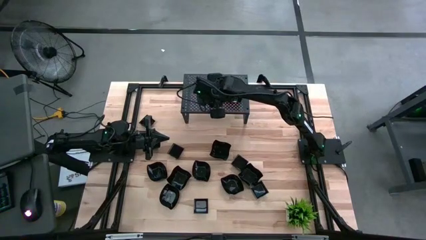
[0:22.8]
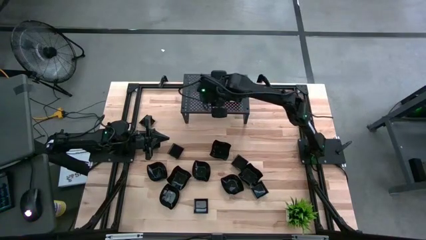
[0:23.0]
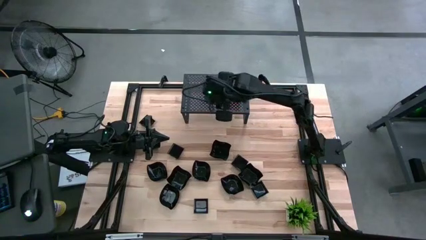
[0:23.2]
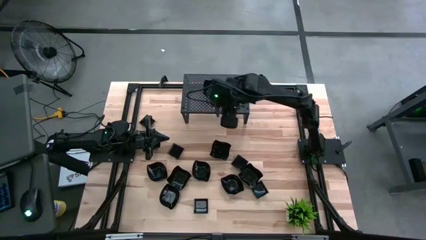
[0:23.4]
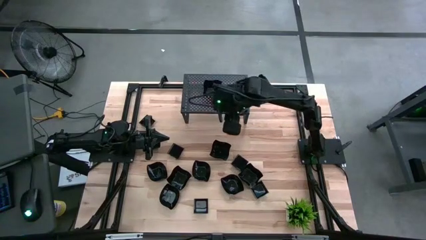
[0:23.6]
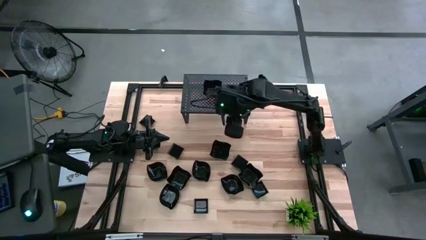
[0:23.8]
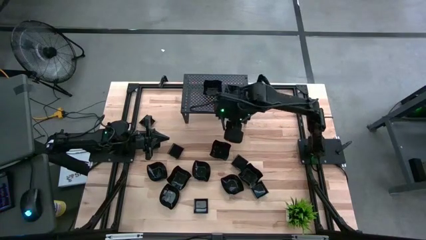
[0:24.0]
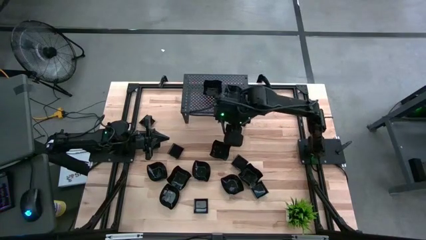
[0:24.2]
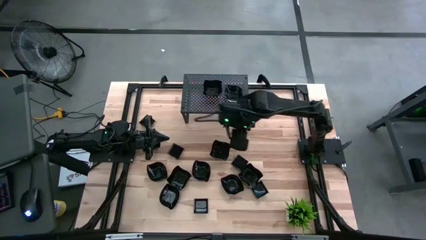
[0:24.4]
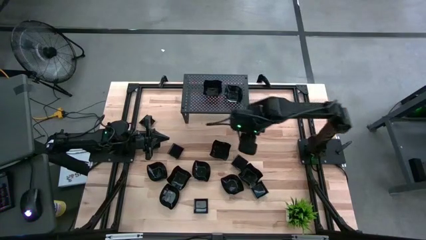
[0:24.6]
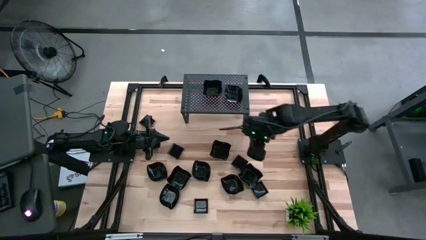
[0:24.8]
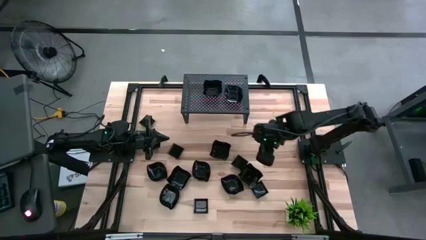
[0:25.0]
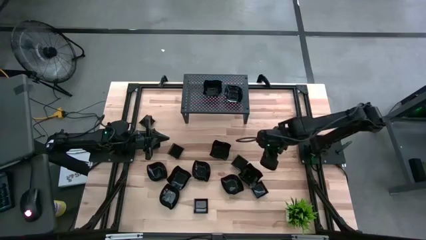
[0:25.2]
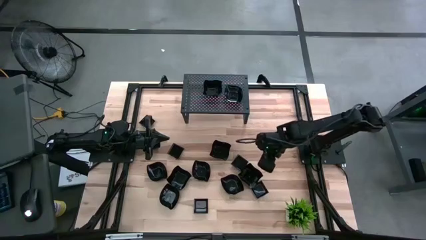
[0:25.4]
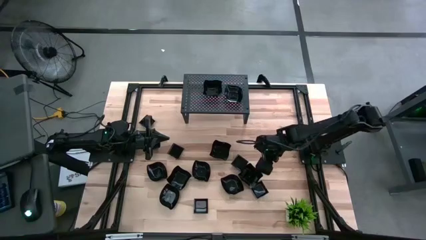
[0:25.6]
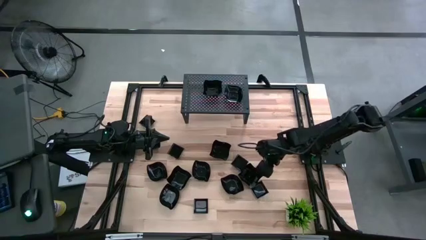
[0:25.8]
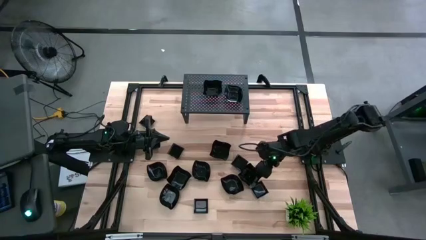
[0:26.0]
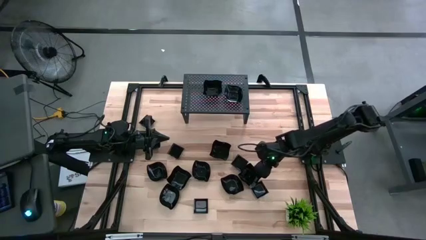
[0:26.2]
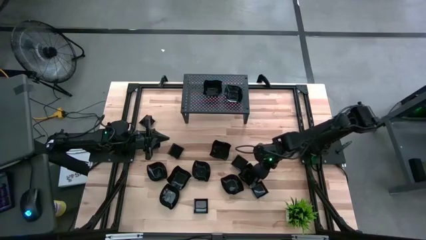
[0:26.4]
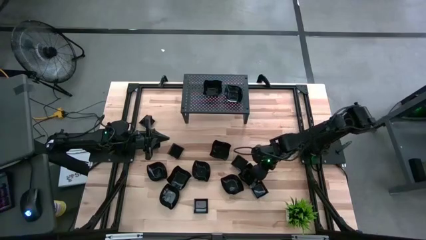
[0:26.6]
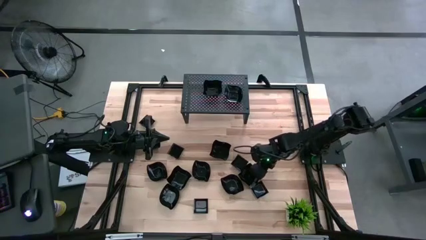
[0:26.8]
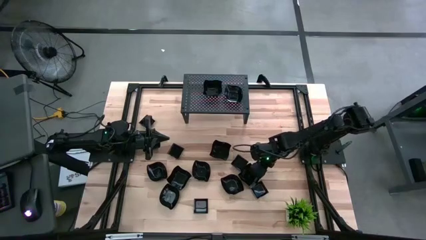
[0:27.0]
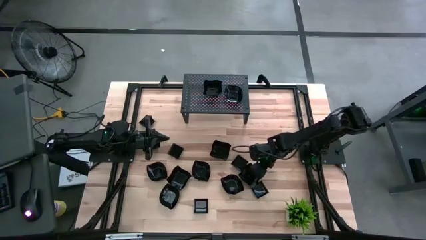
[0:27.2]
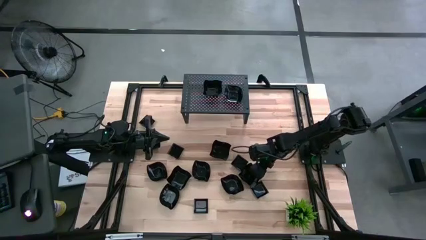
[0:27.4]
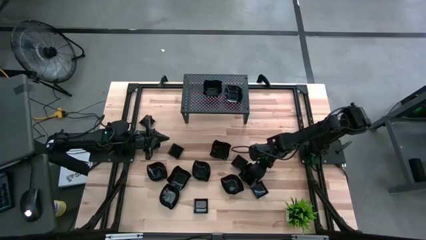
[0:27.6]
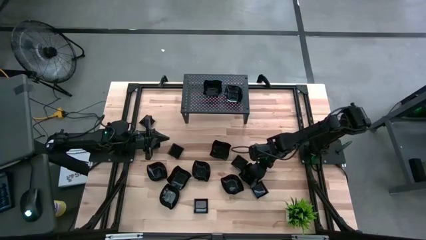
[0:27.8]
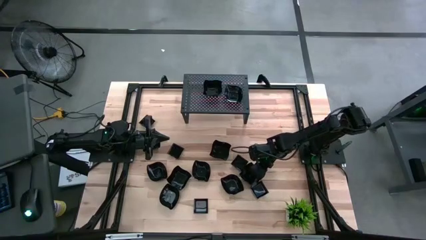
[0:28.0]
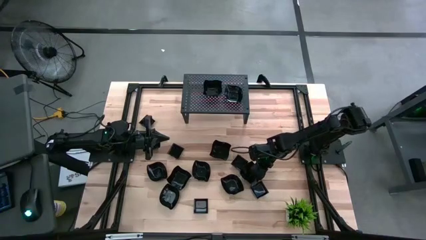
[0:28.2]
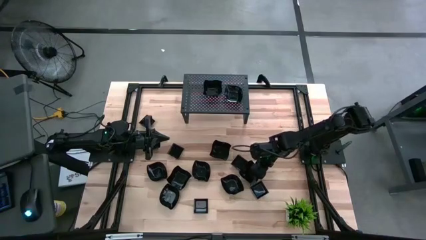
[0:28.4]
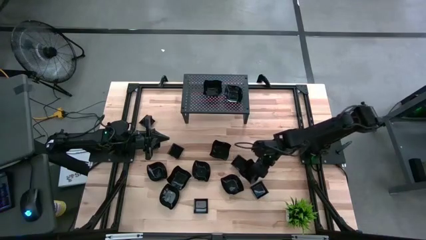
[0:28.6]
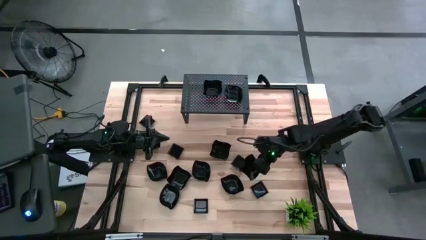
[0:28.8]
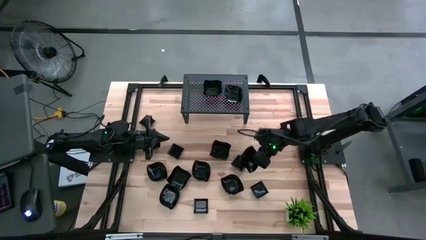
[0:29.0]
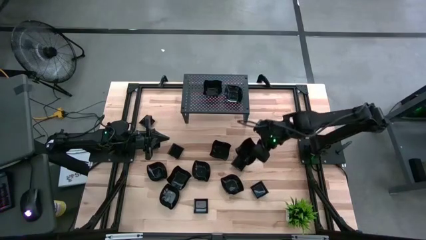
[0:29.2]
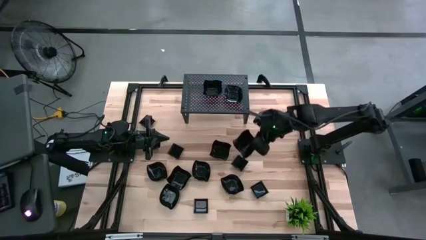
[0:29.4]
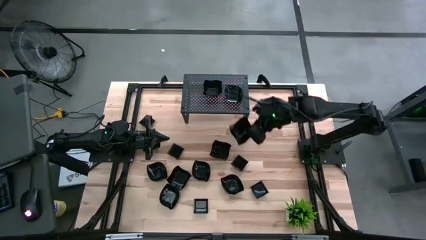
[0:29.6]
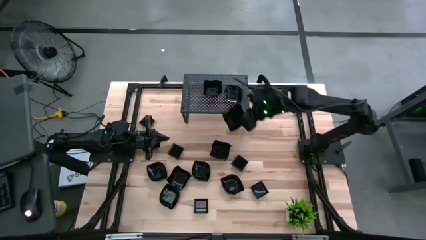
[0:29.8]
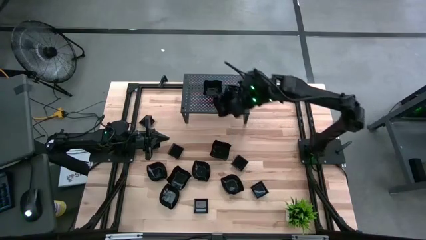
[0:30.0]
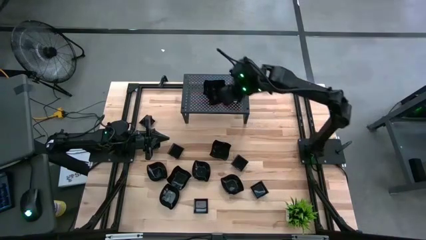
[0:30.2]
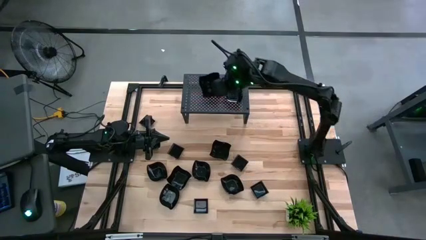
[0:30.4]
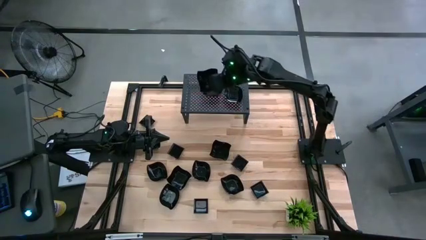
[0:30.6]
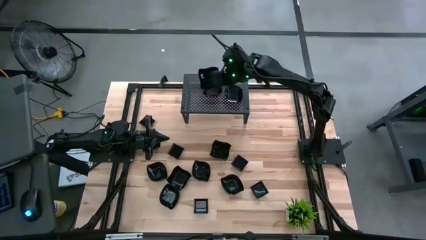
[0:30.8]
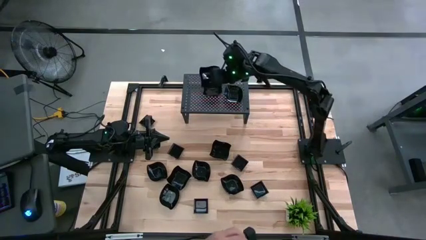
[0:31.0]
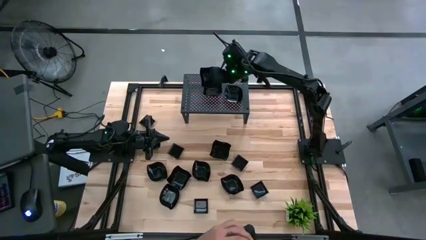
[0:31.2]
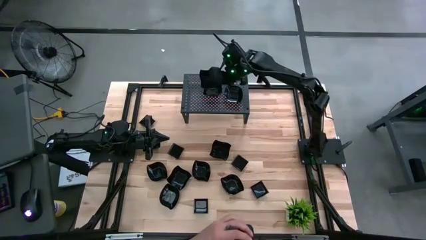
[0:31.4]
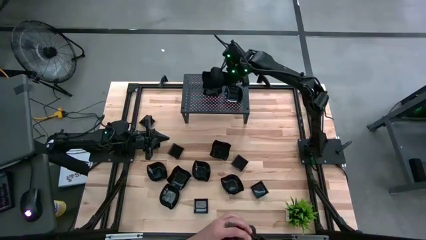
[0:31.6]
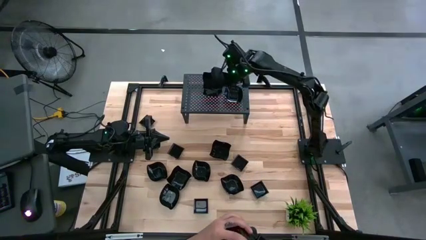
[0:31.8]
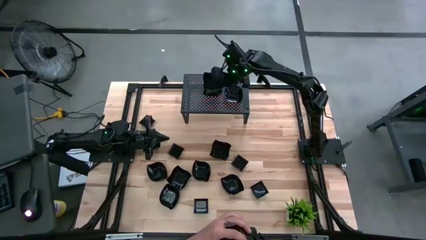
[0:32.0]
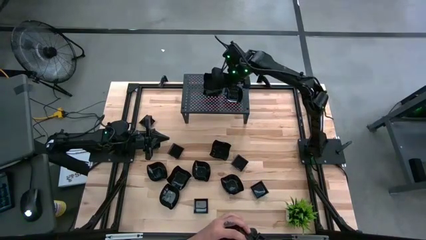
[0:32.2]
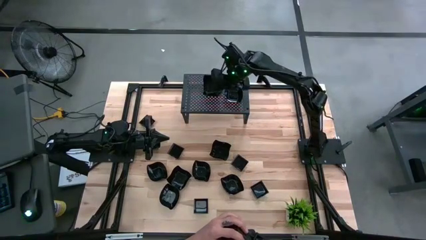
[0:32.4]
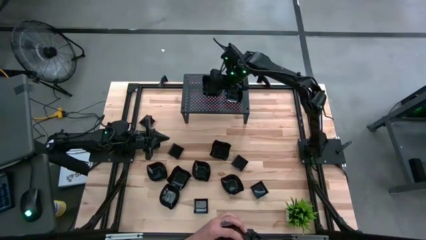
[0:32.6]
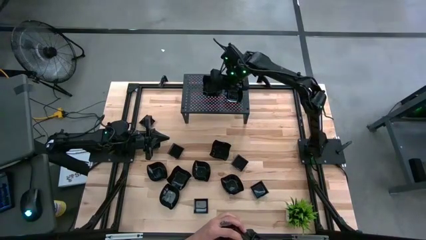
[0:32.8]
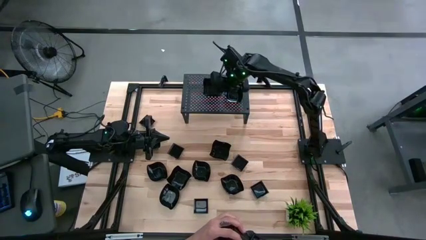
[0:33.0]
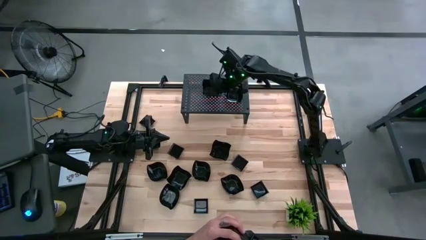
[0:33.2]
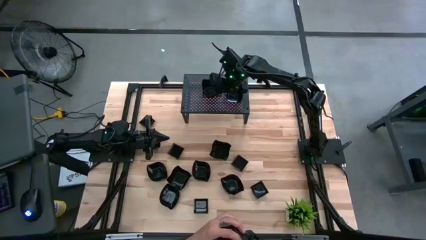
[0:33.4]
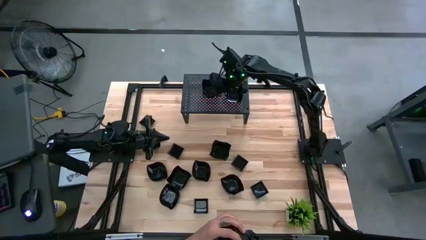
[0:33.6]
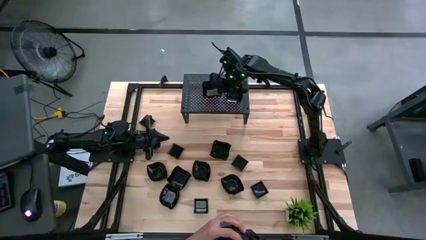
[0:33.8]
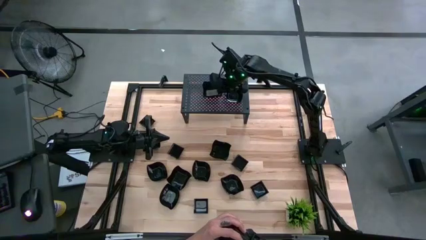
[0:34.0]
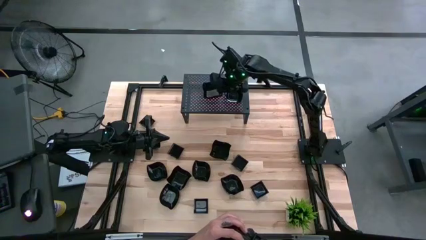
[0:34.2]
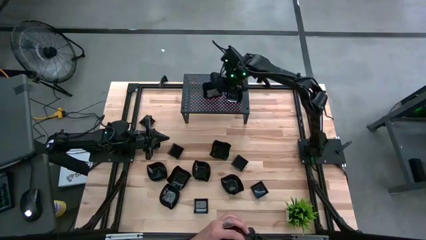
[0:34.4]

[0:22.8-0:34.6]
Task: Pick & Place Mini shaped plates
Stack the distorted square plate on top of the distorted square plate on the shelf
